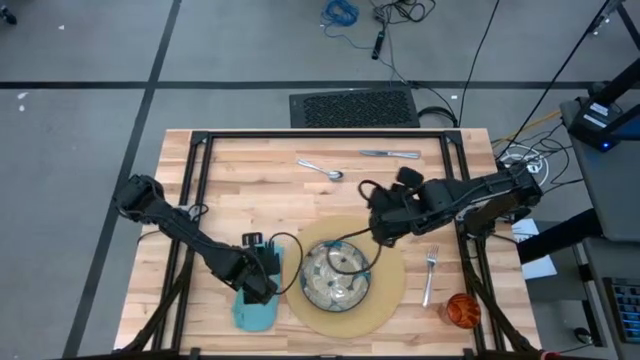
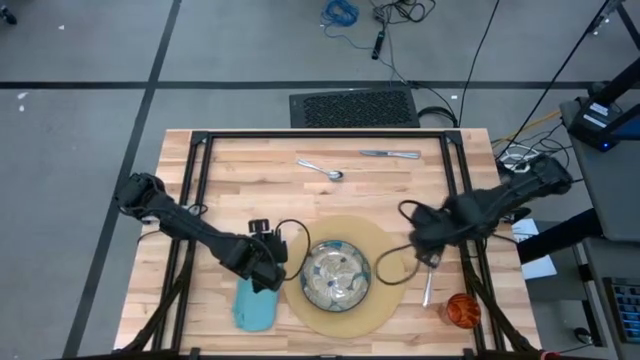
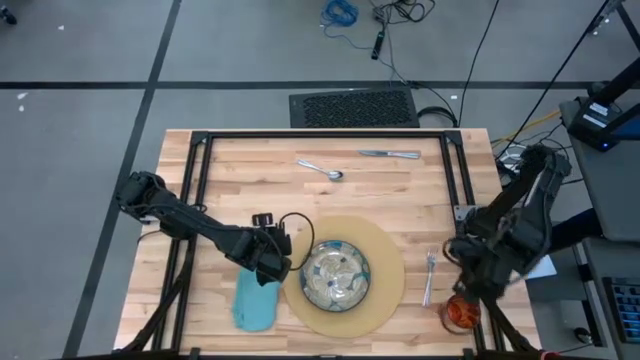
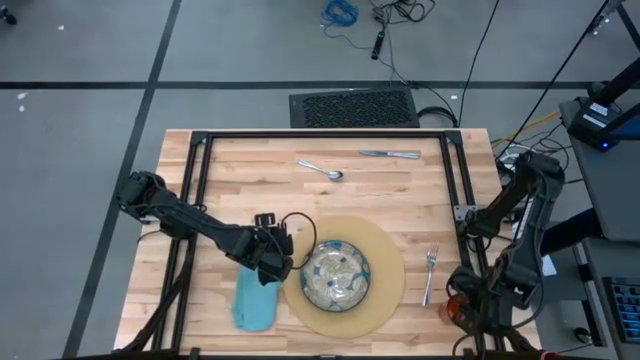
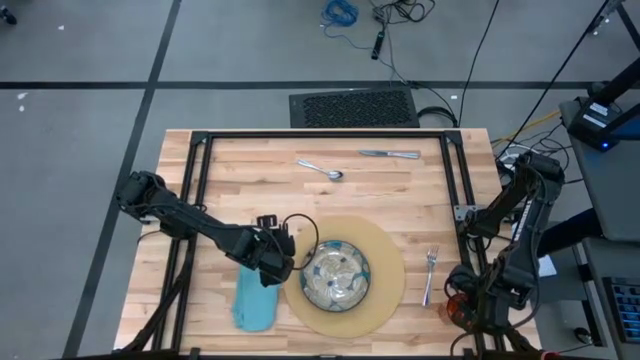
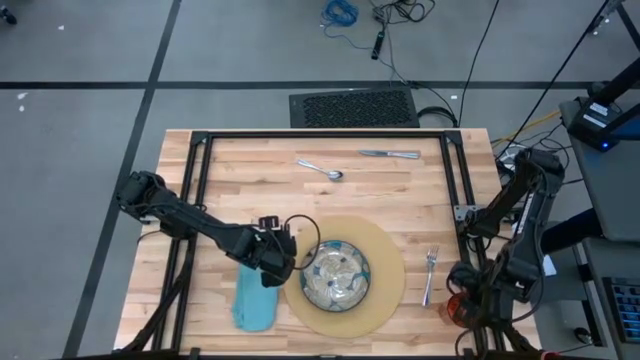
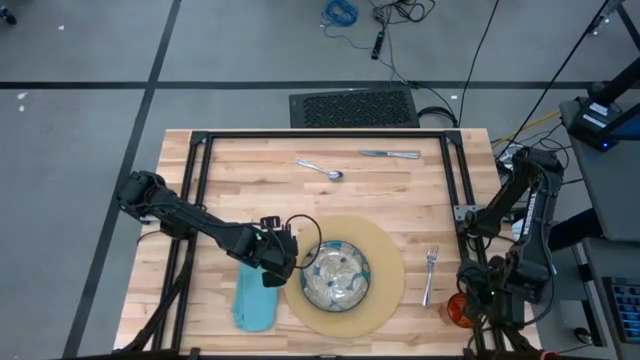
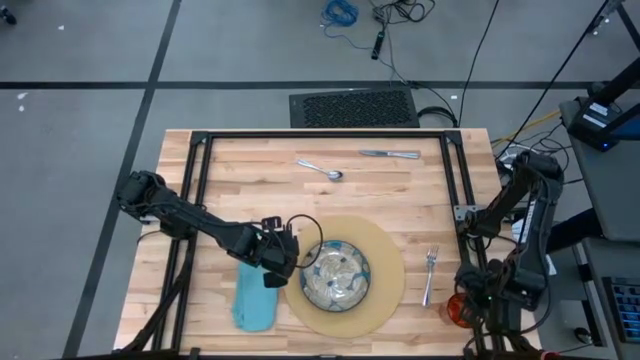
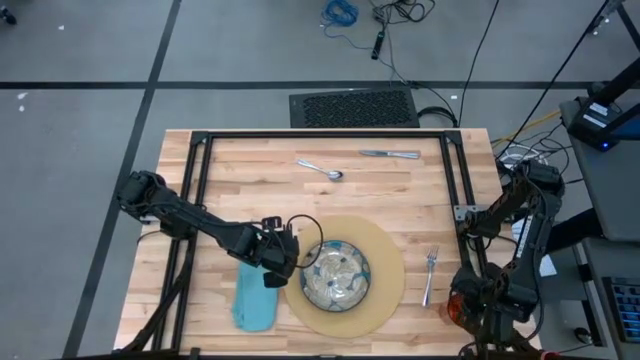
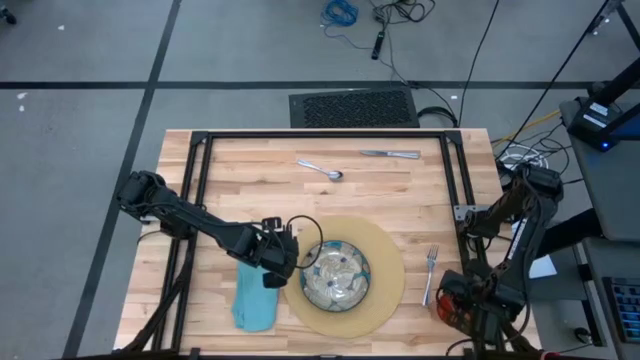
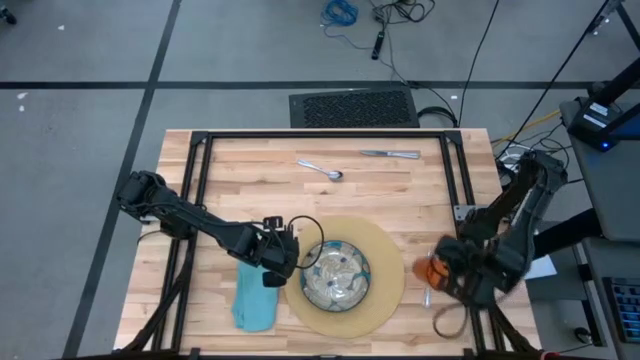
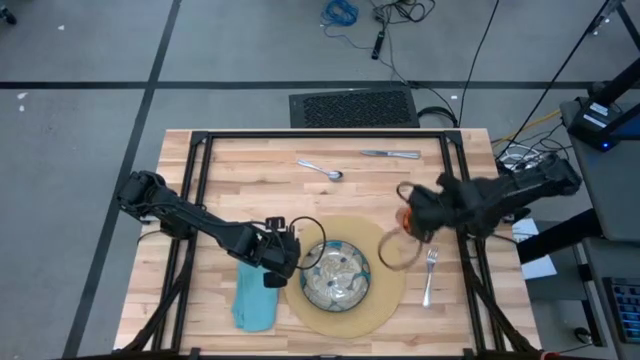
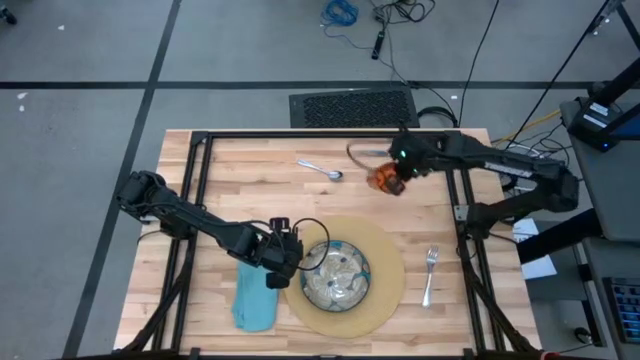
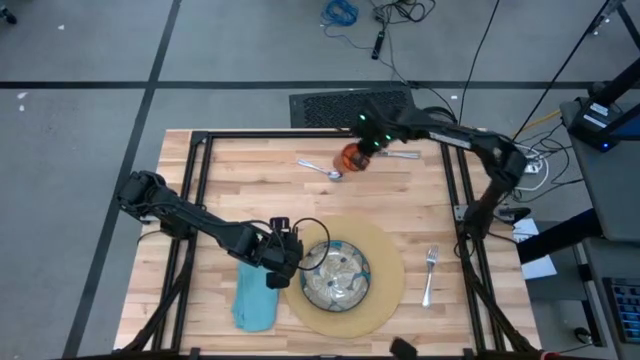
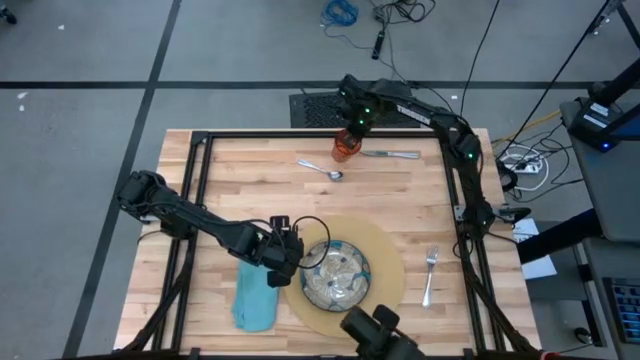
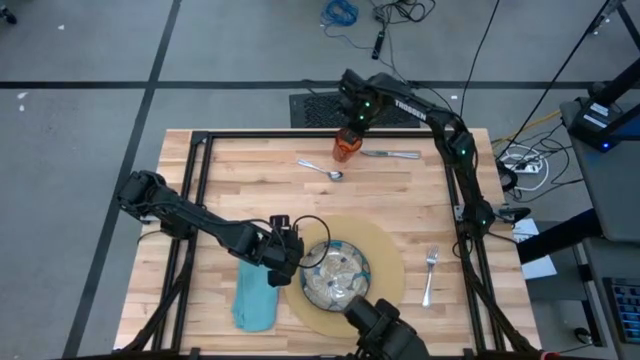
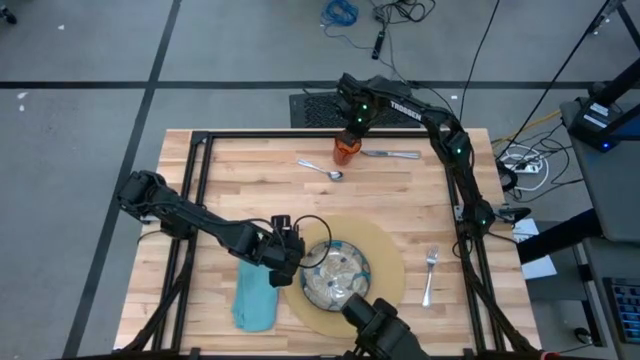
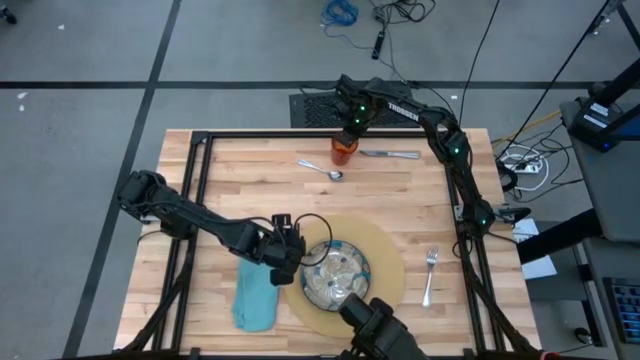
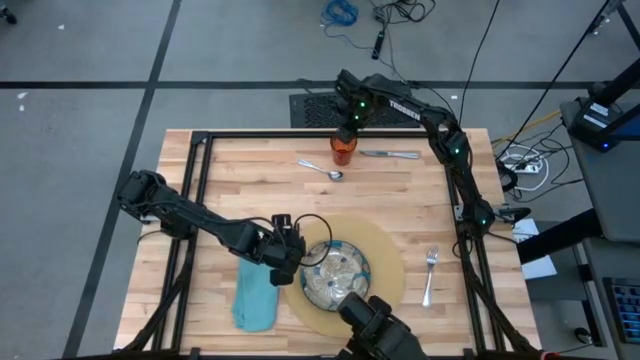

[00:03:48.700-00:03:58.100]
Task: Set table place
Move the dark brown glass to the top center of the table

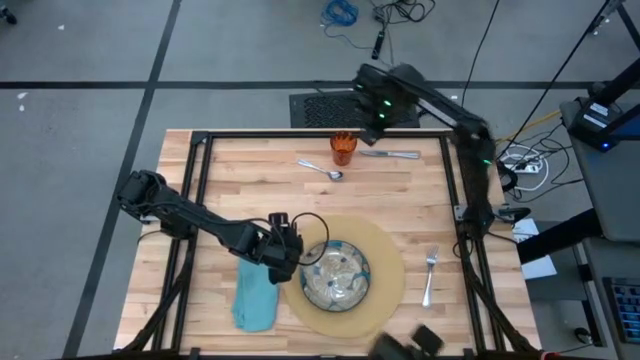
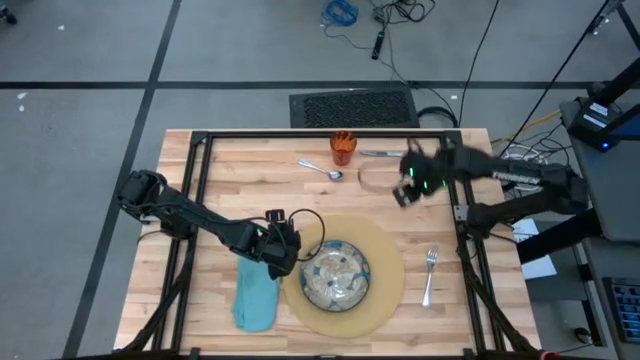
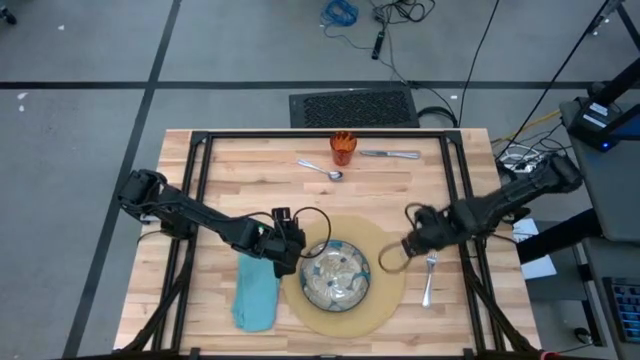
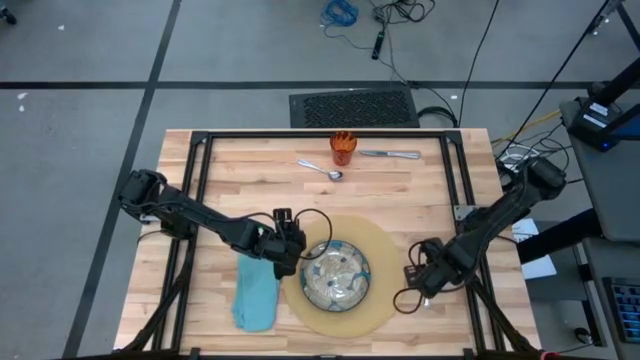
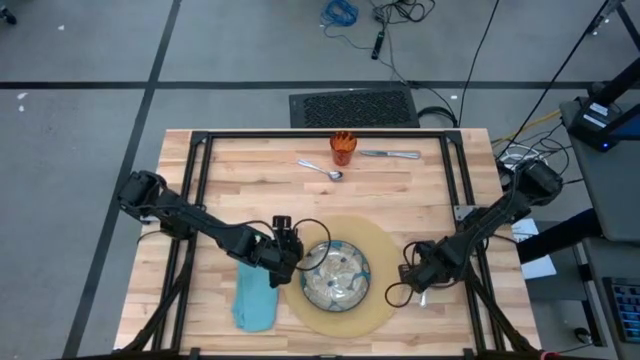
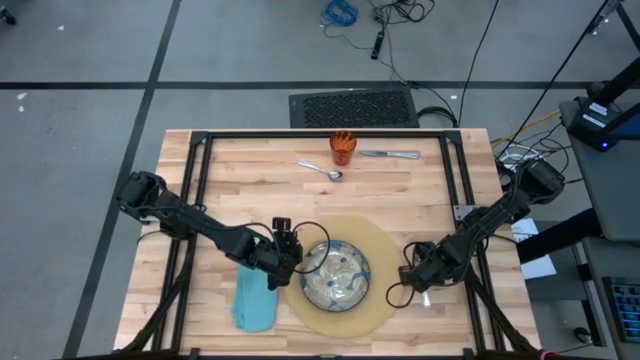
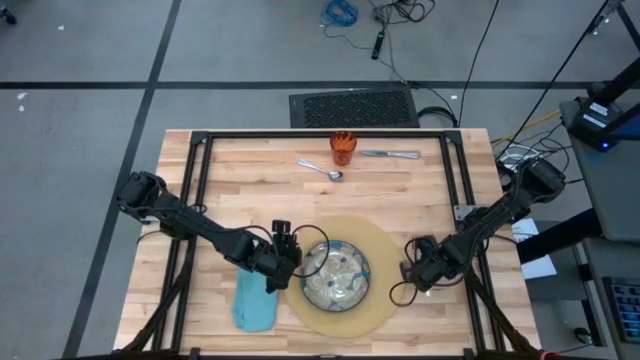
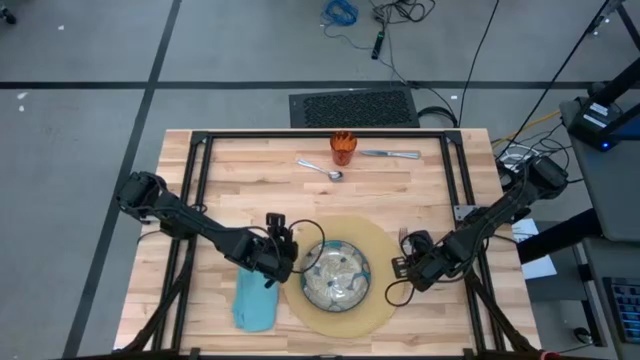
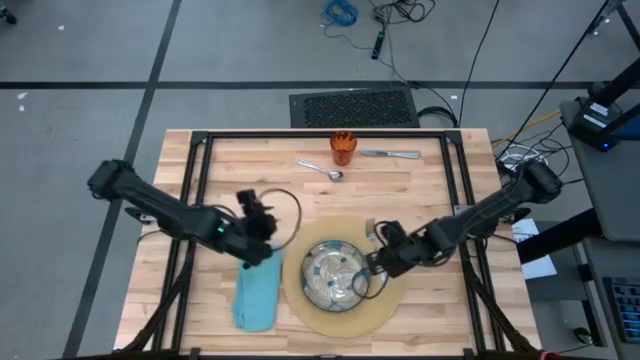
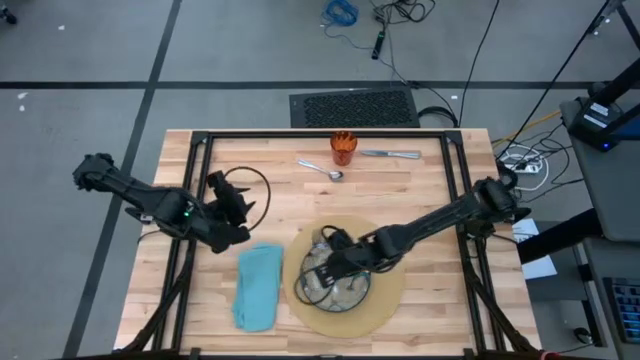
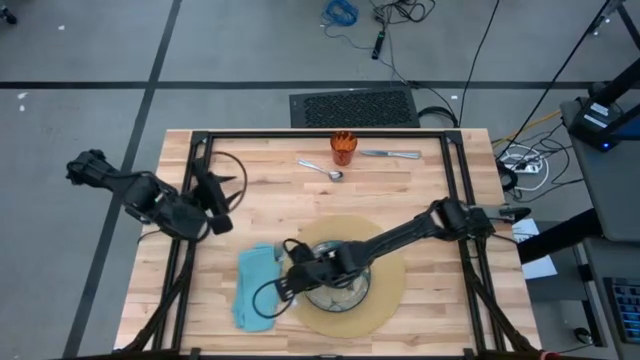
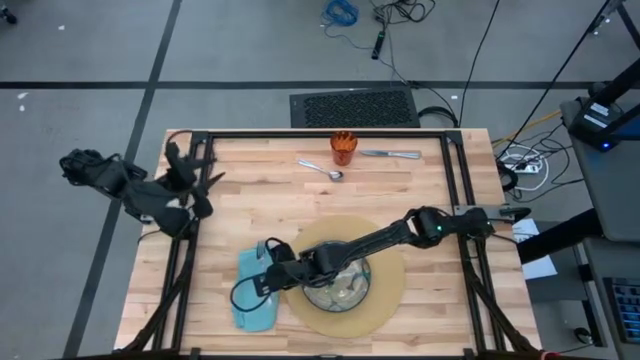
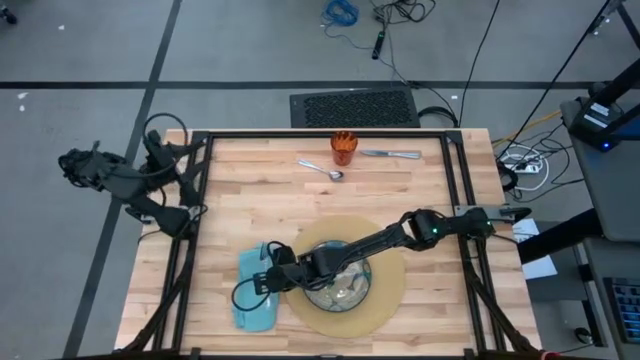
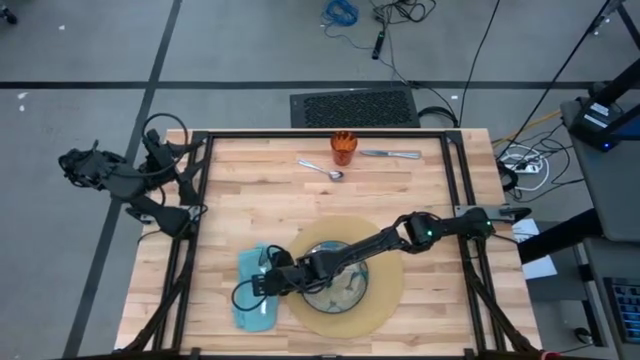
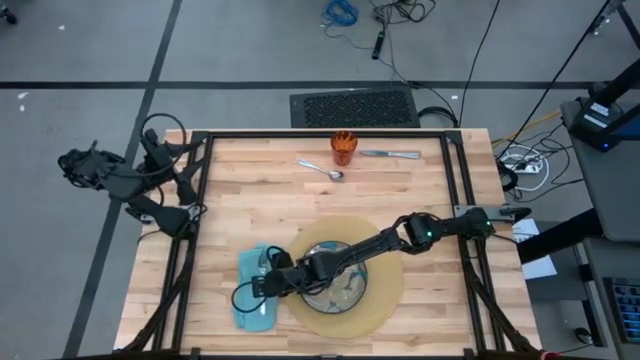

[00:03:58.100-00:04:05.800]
Put the silver fork on the blue napkin
